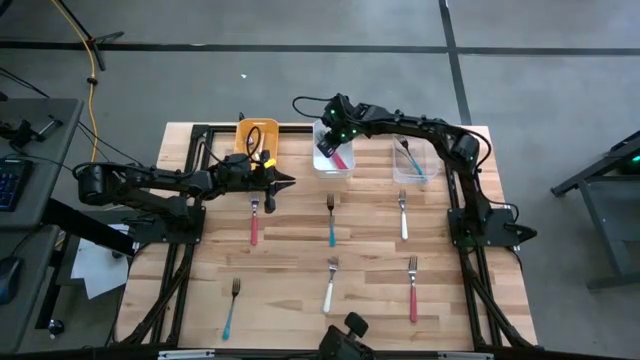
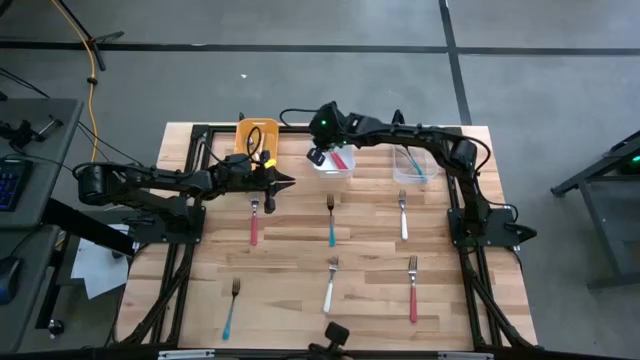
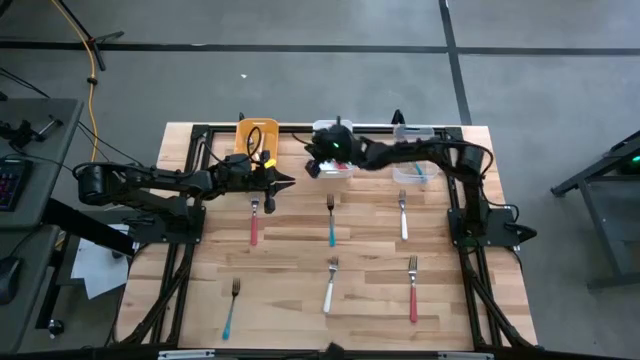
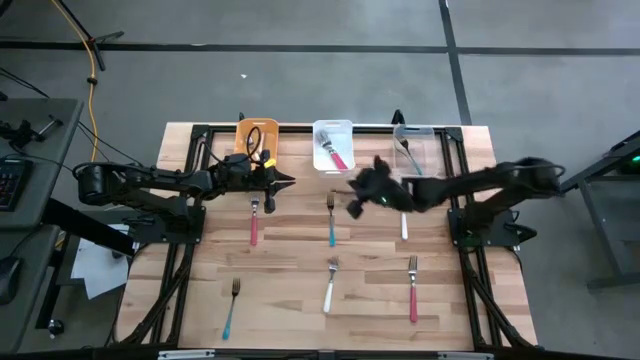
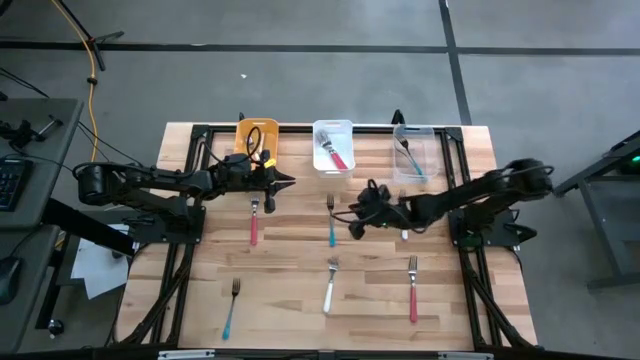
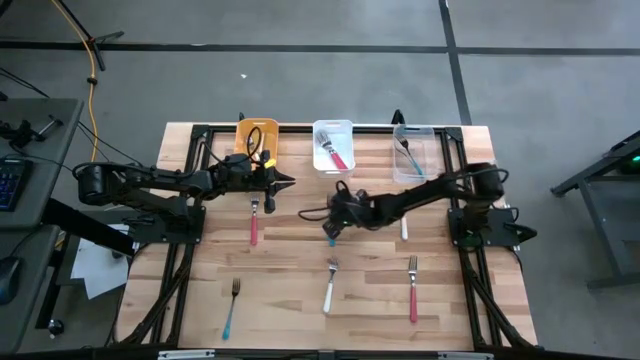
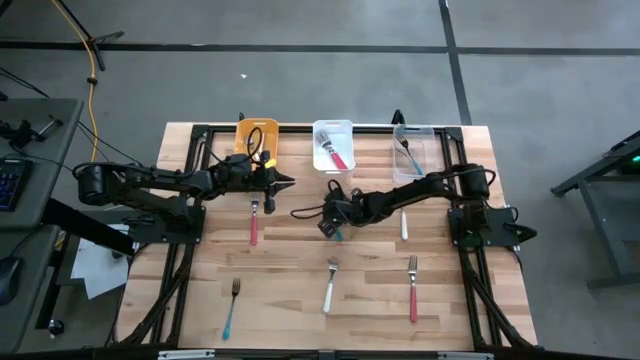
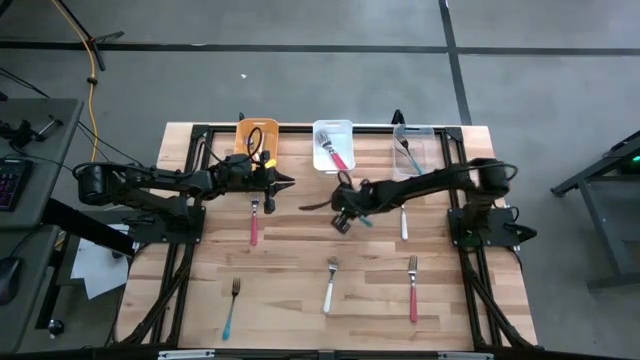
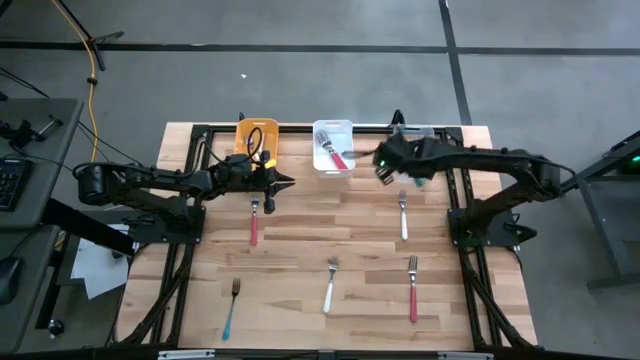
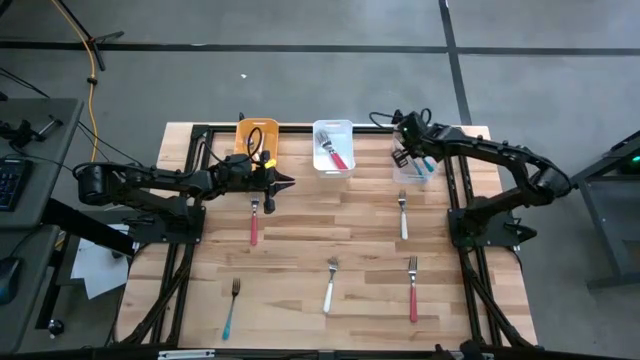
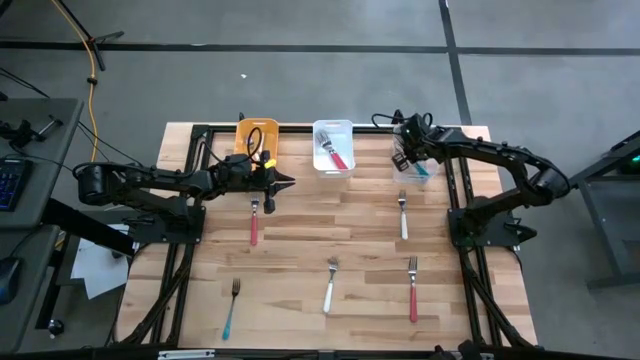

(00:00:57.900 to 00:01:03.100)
Task: Sort silverware by color (type)
Put the top blue fork into the transparent bin

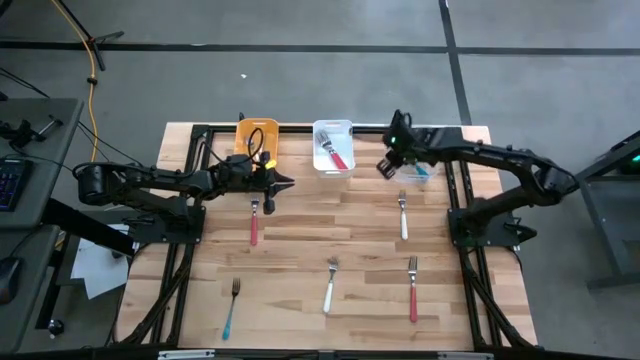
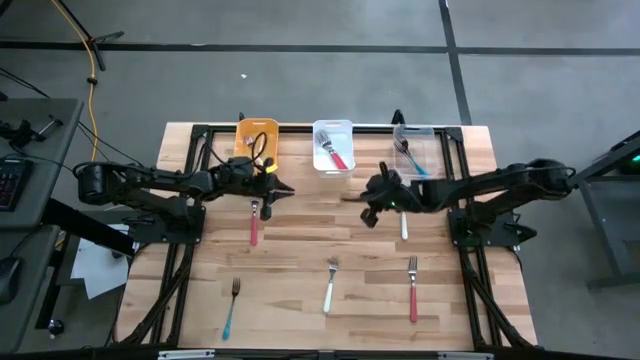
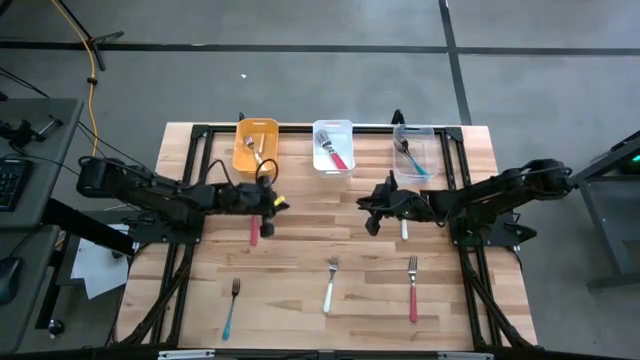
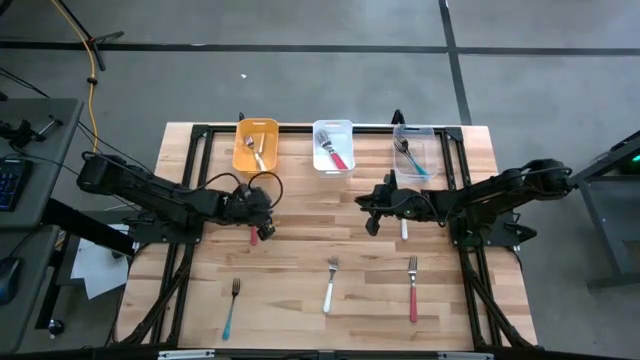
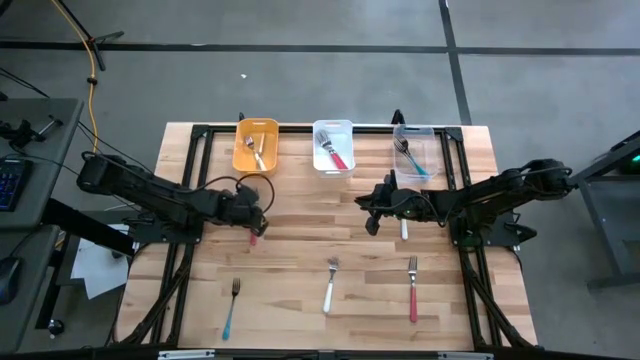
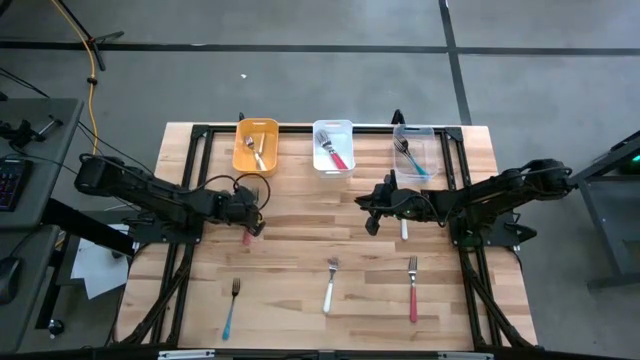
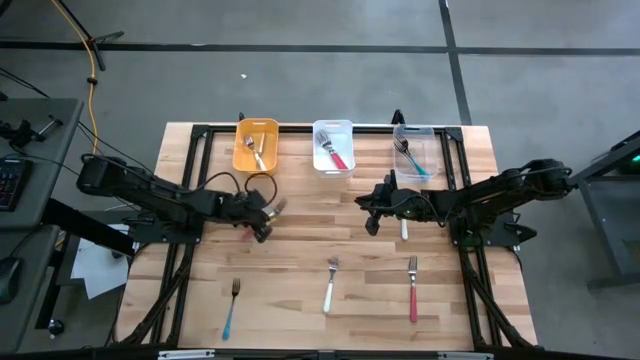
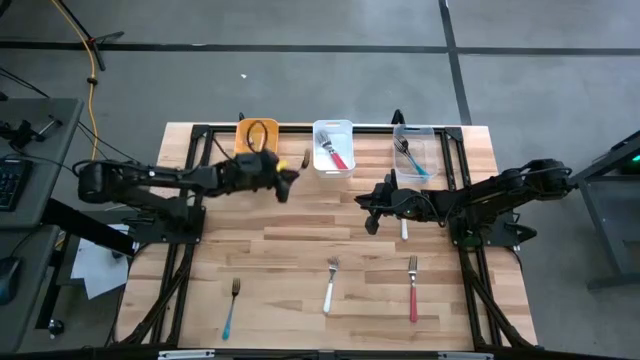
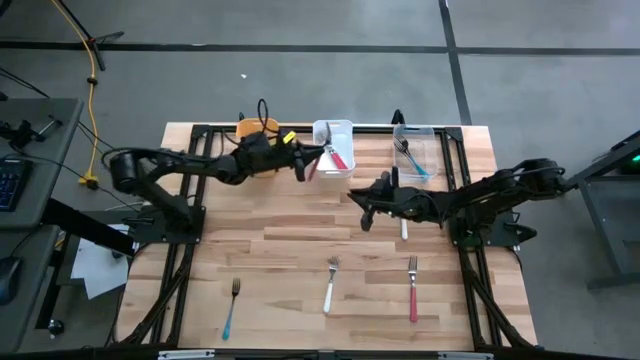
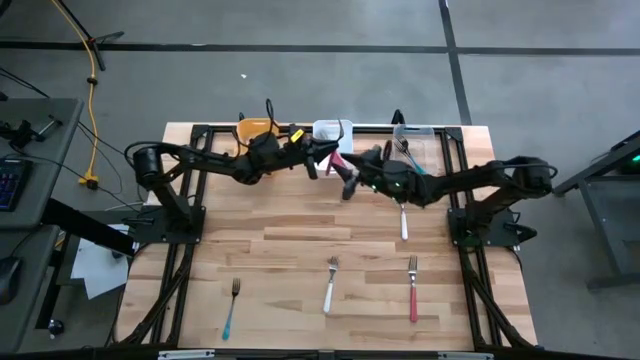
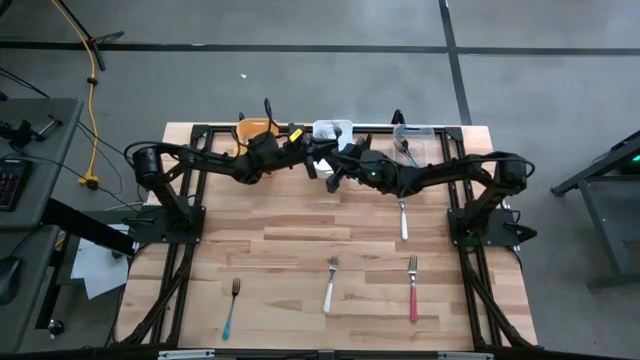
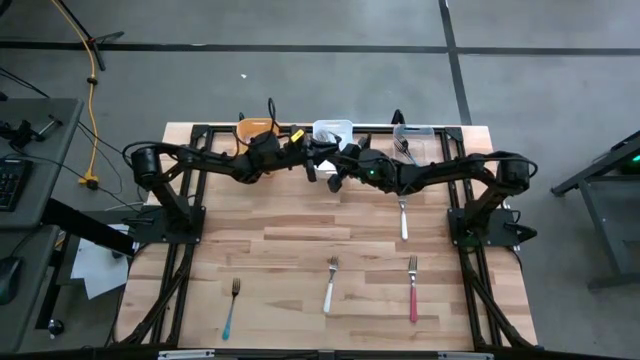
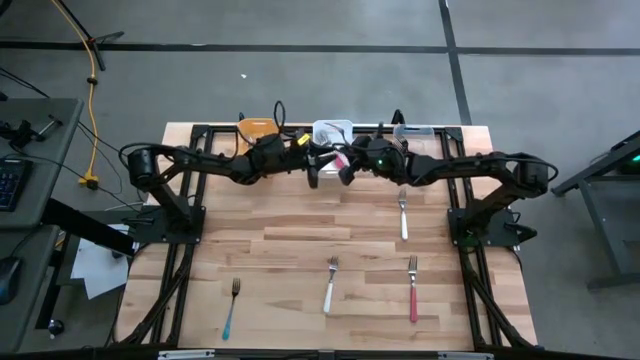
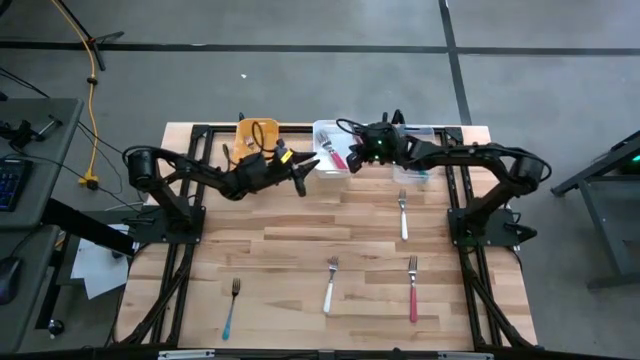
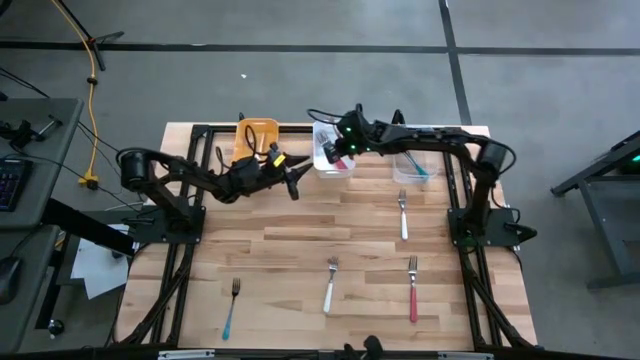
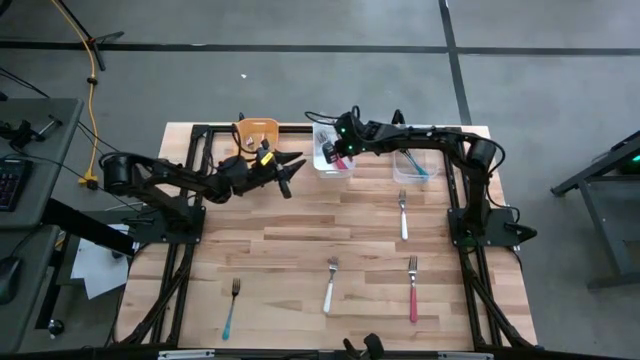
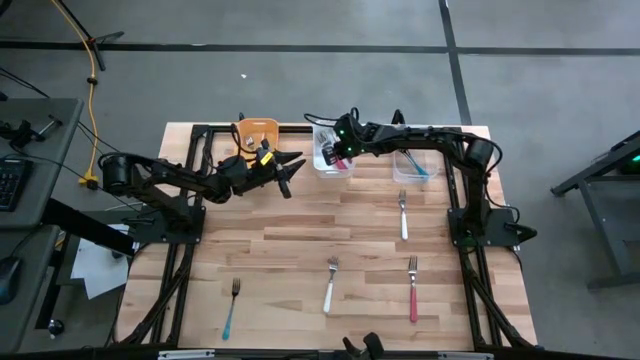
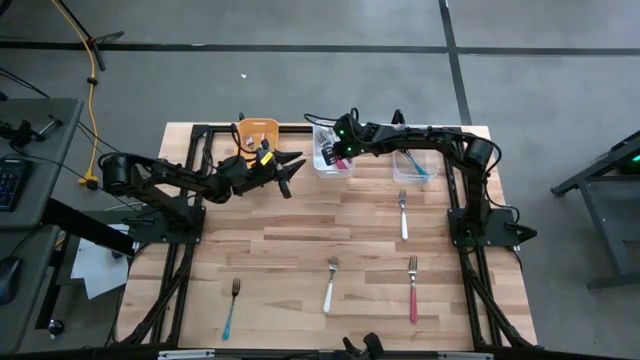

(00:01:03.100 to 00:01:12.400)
Put the top pink fork into the white bin

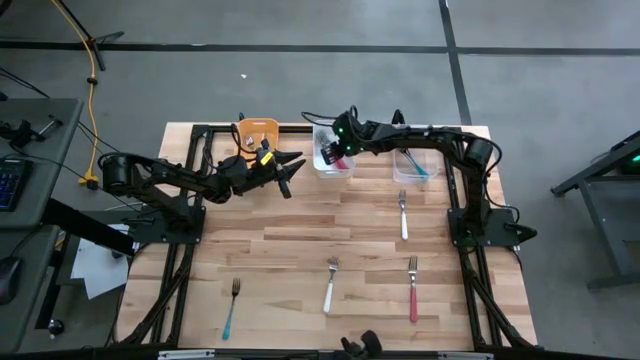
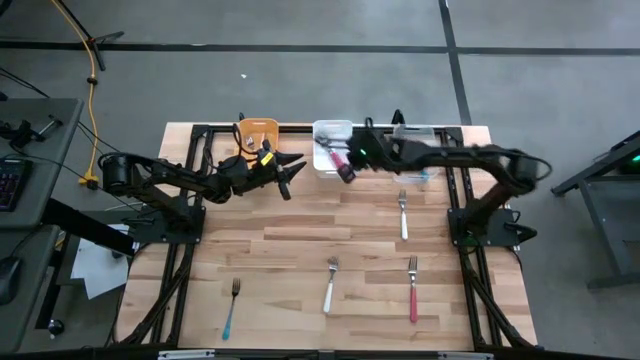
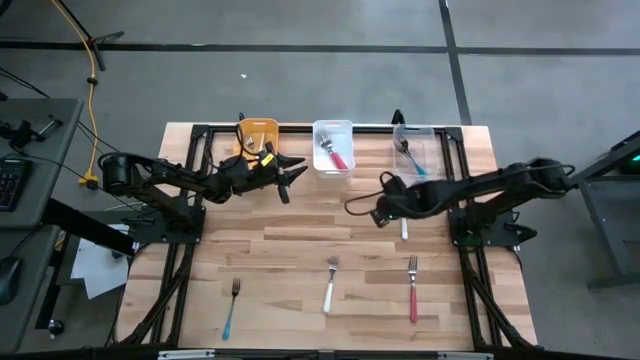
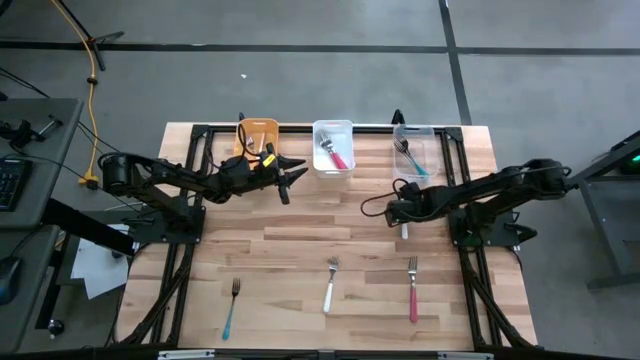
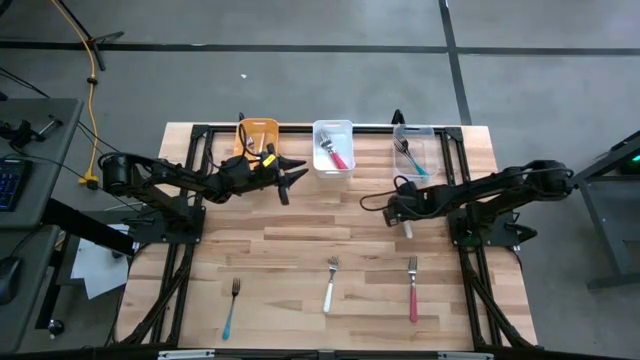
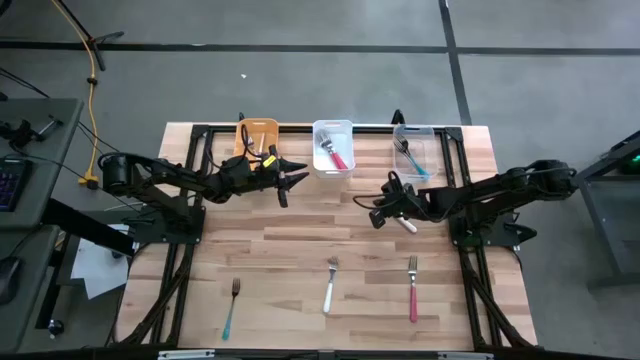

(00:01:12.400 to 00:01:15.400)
Put the top white fork into the yellow bin

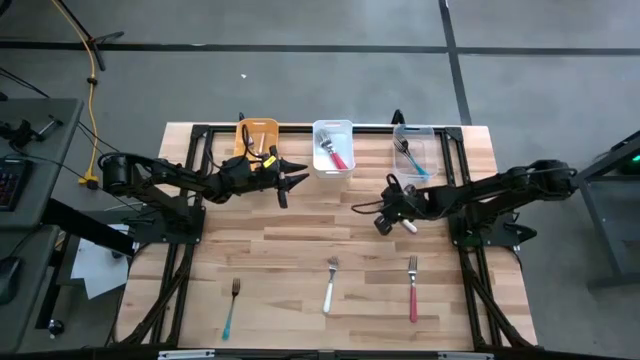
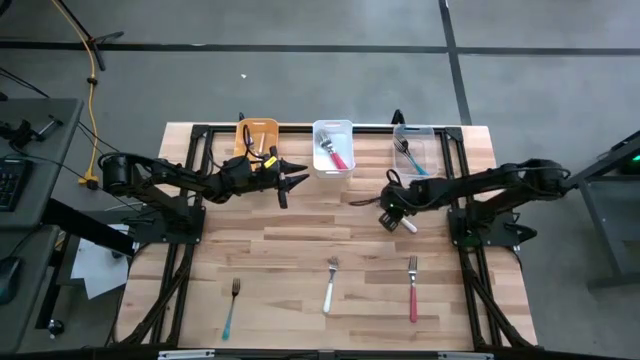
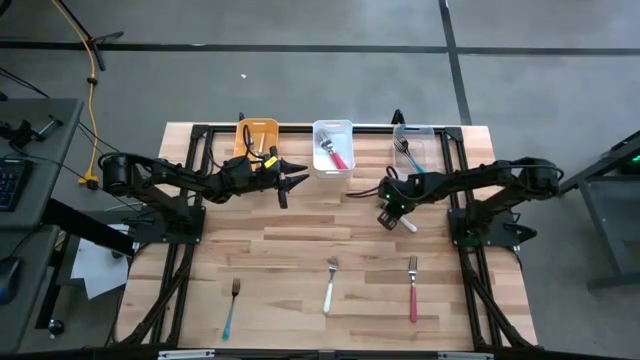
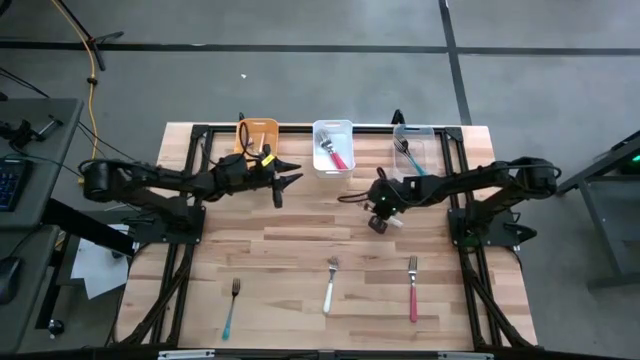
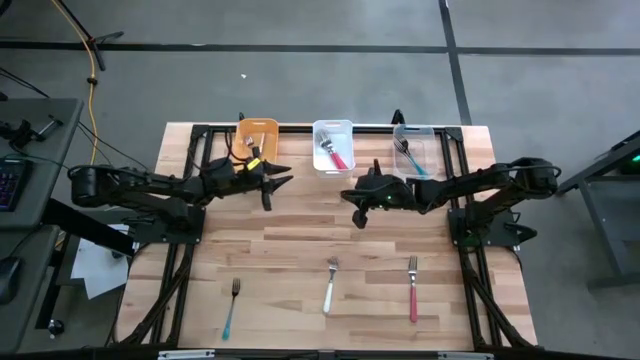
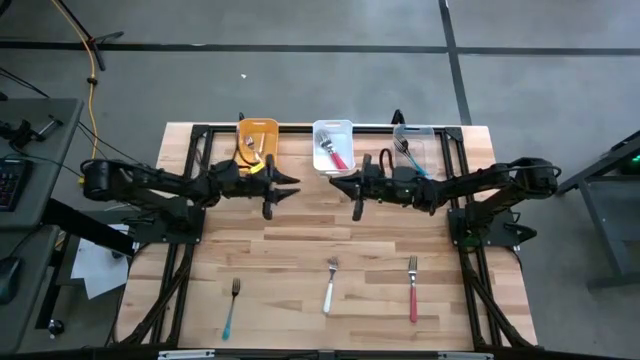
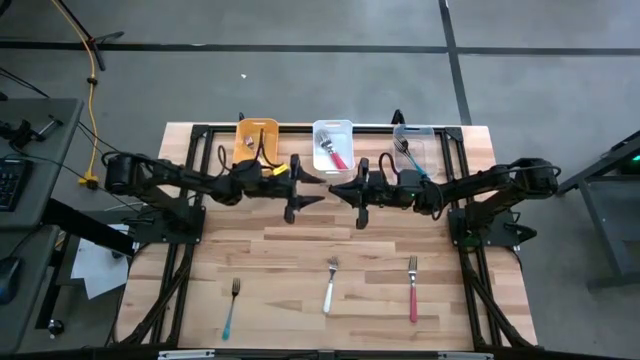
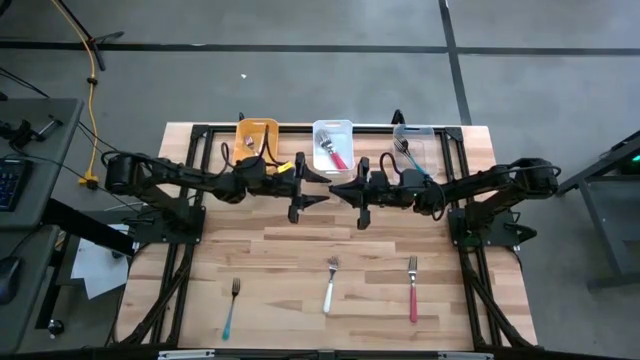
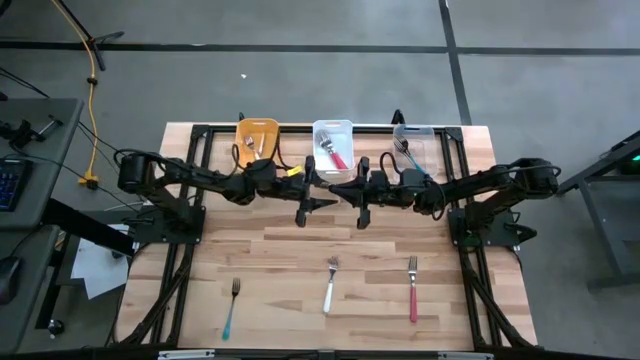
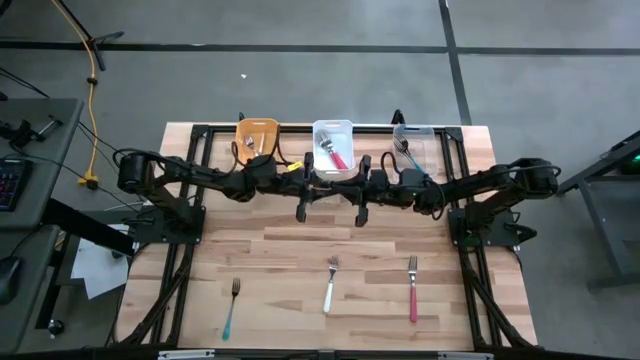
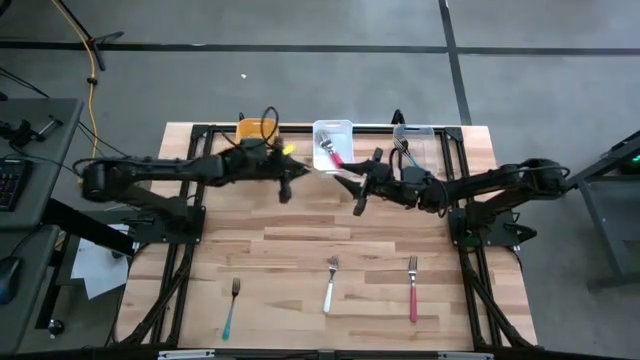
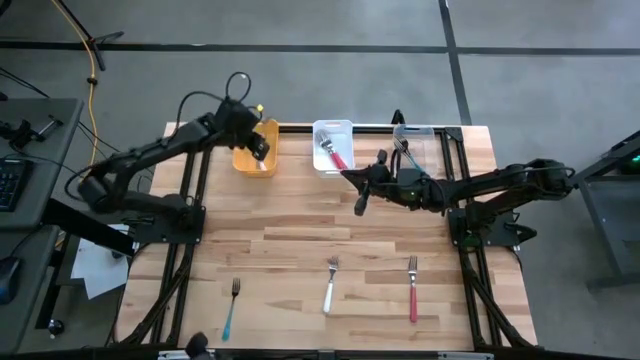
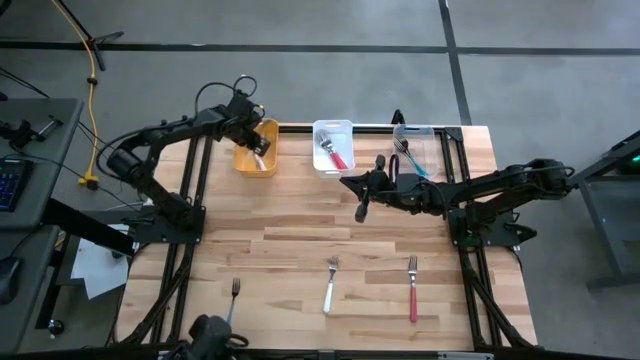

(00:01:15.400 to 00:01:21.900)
Put the top white fork into the yellow bin
